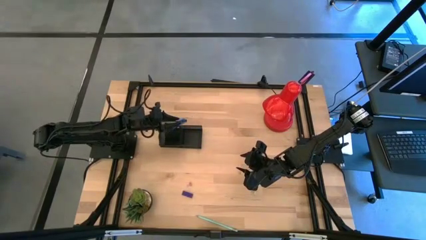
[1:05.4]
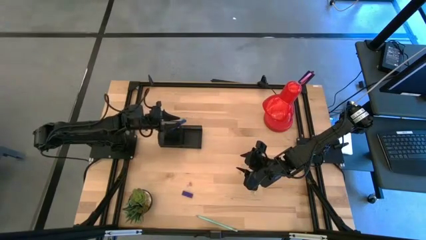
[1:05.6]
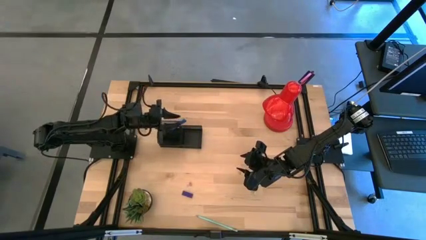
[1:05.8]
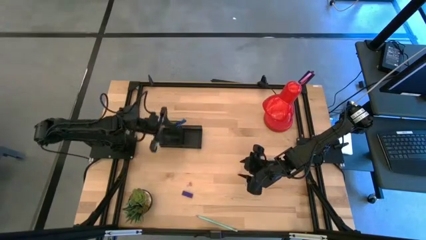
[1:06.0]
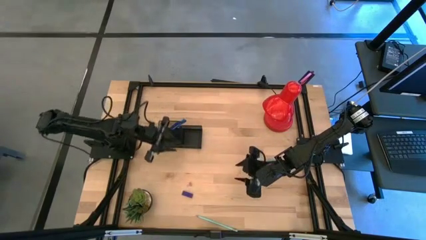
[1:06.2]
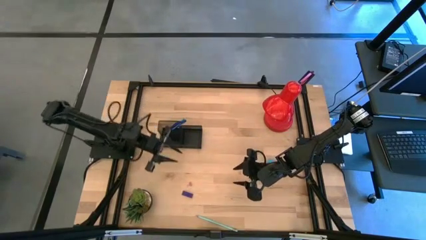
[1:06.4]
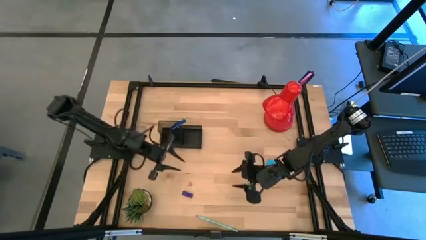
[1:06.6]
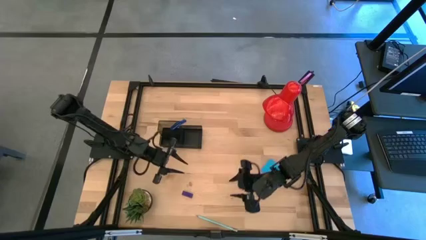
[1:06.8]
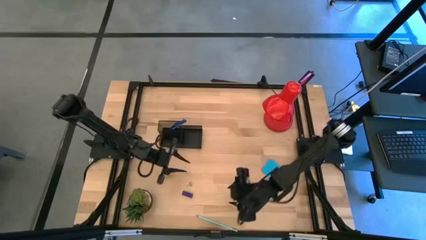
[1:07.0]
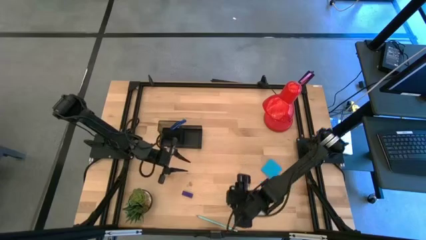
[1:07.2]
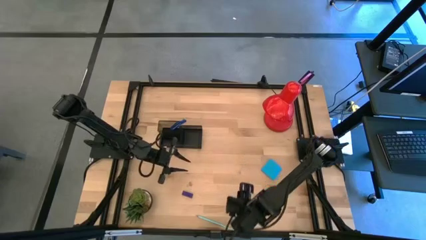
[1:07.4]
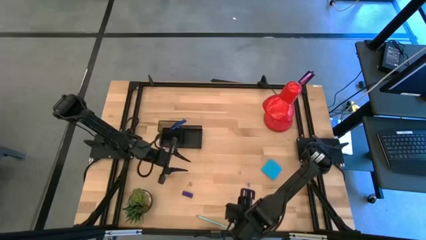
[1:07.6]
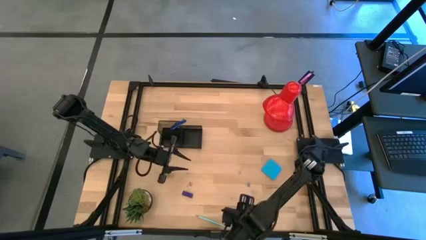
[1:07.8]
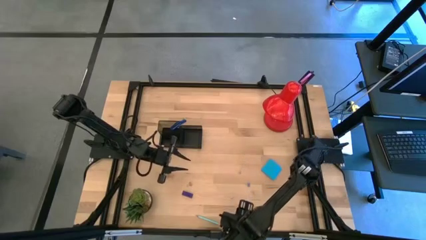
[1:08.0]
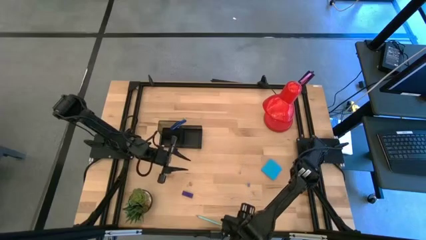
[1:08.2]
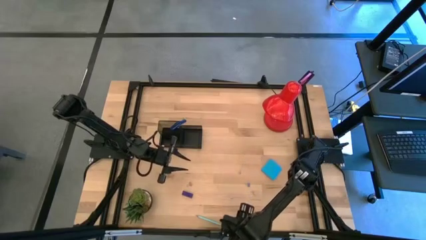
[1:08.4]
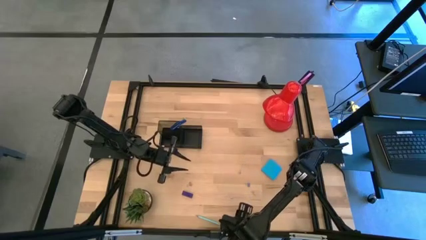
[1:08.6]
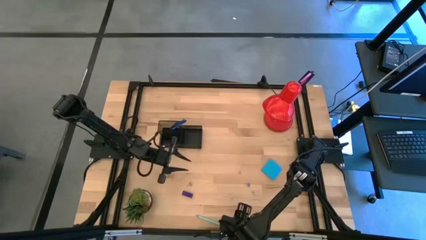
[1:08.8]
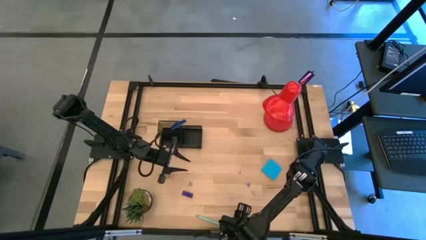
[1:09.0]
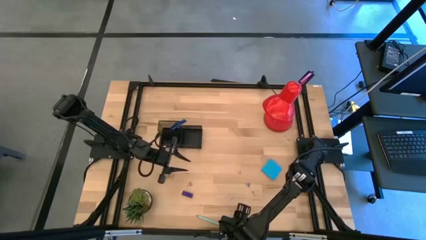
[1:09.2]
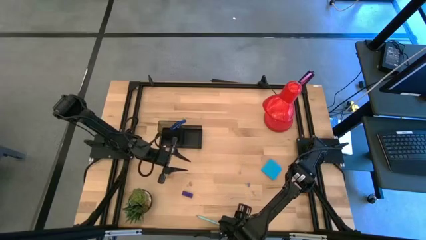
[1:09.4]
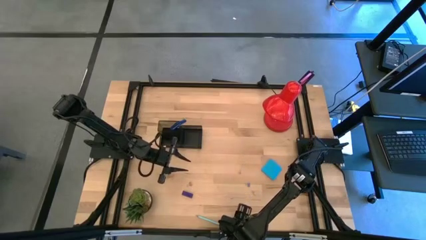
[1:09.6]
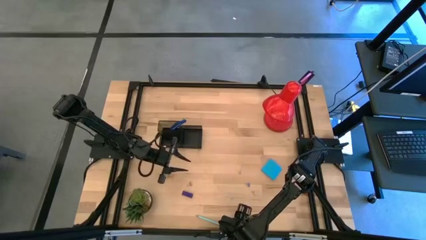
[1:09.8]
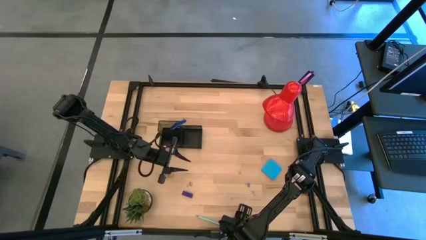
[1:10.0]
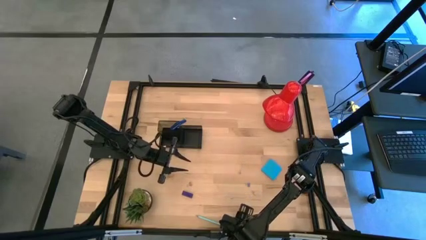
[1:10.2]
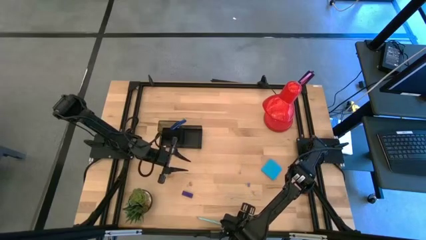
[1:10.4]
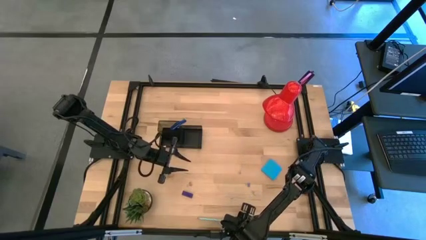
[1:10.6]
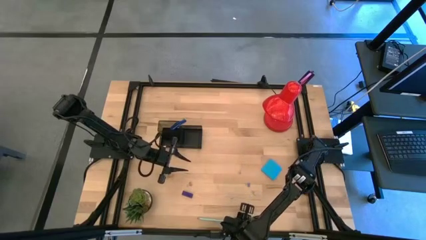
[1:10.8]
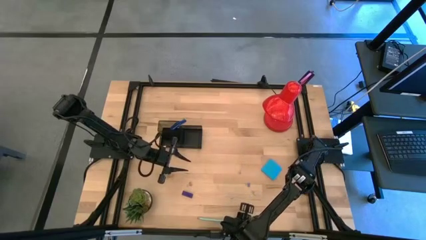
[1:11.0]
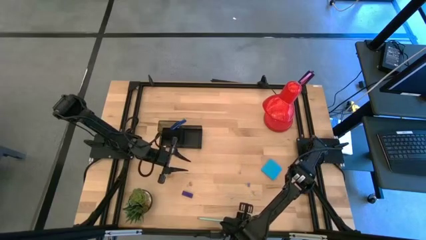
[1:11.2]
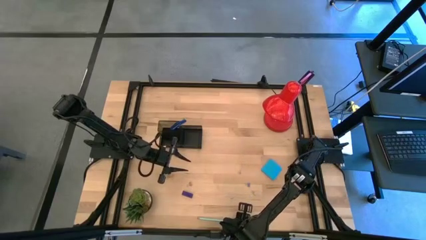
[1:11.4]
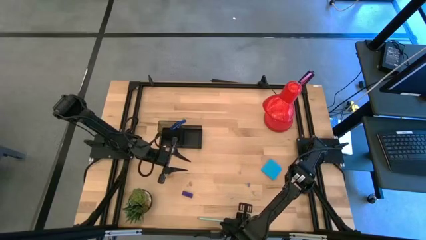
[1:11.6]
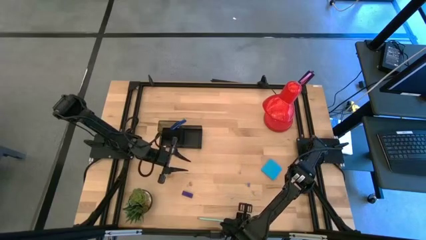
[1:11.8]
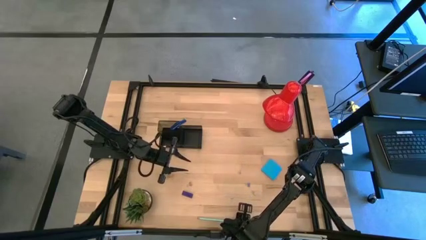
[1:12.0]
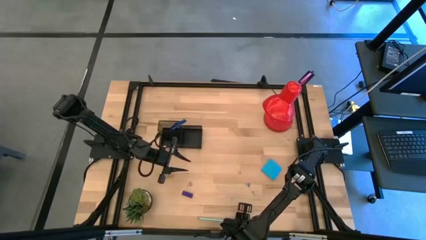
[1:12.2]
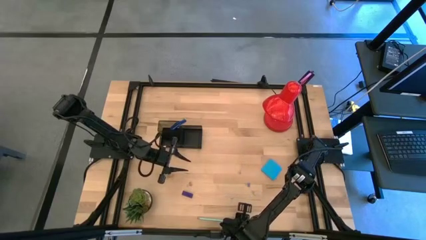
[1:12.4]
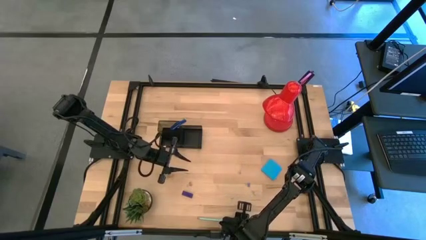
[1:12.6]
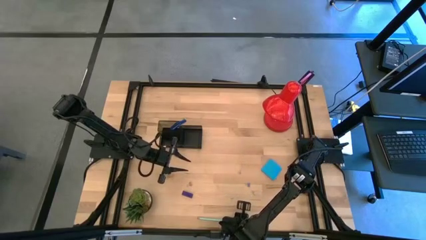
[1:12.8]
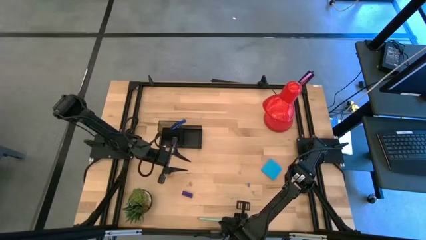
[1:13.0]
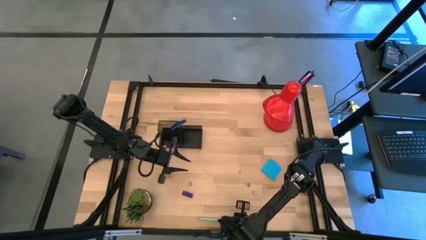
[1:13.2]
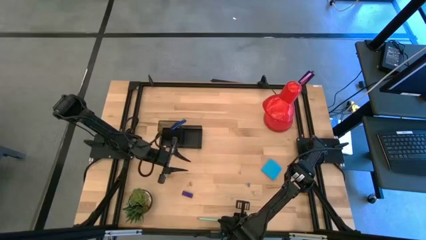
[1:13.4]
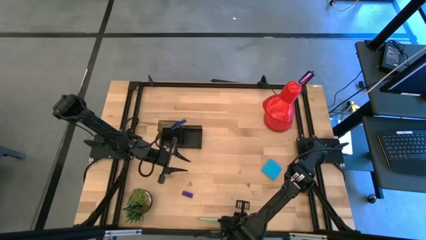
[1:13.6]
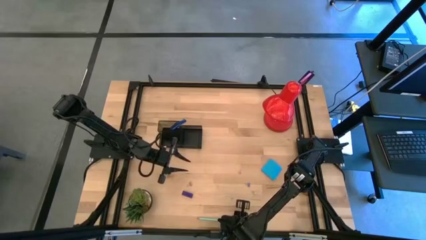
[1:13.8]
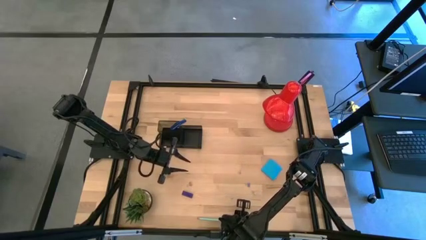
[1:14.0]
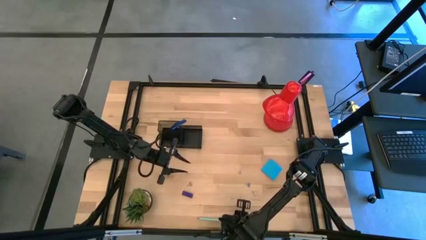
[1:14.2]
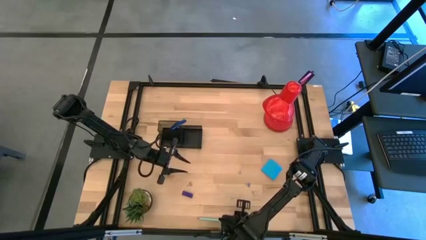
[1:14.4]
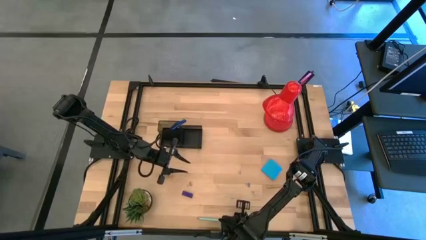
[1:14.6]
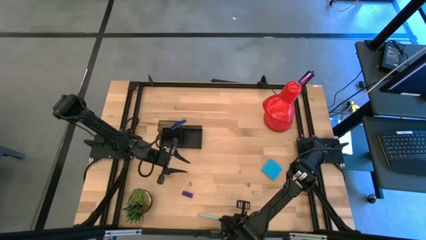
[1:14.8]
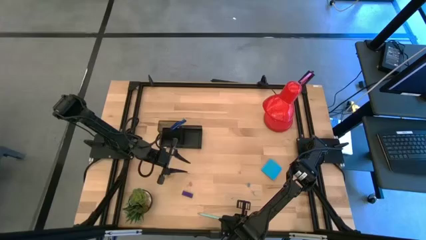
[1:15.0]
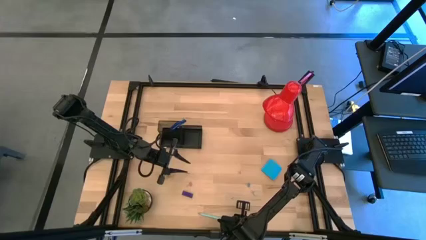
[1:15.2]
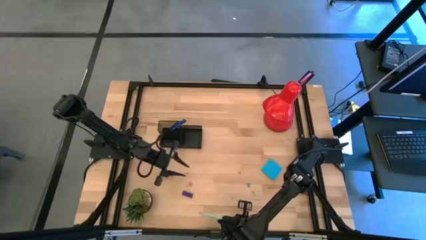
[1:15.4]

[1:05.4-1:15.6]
Task: Pick and place office supplies into organizer
Put the blue pencil into the black desk organizer
